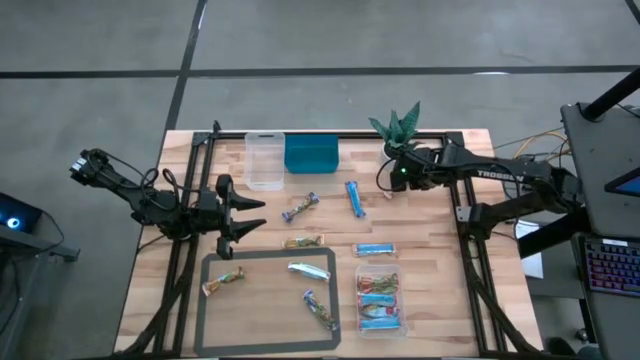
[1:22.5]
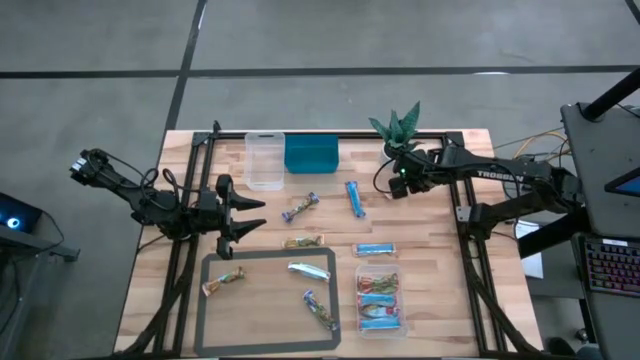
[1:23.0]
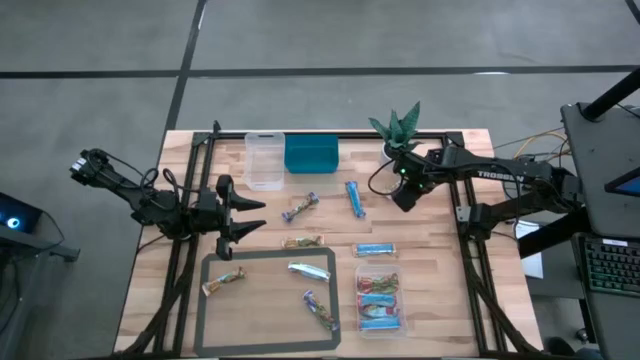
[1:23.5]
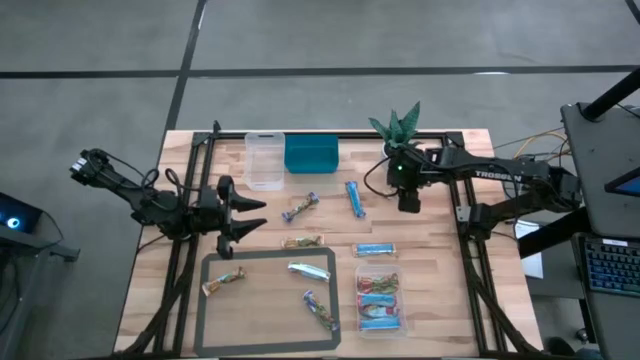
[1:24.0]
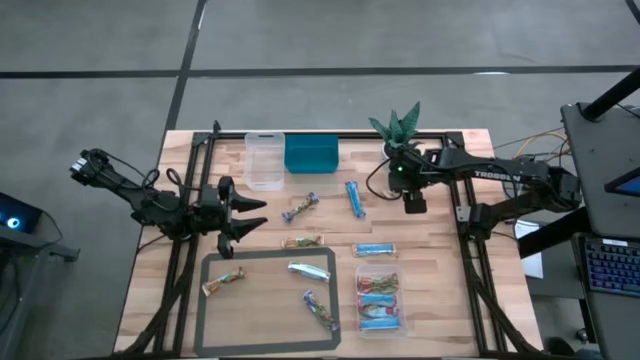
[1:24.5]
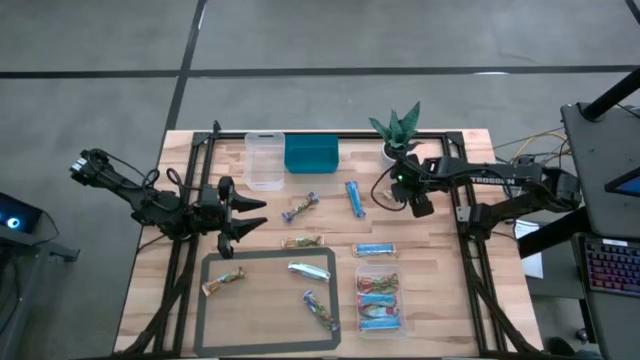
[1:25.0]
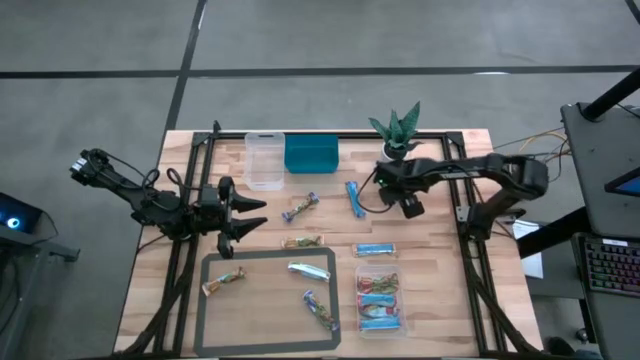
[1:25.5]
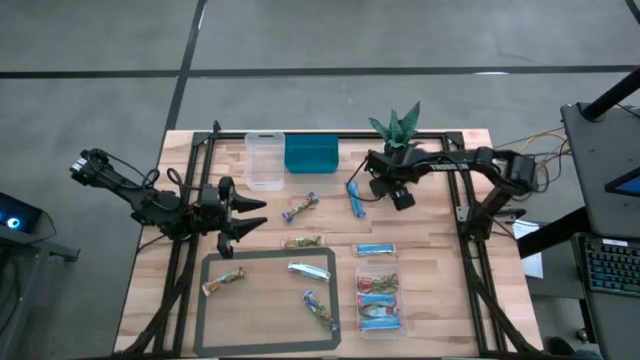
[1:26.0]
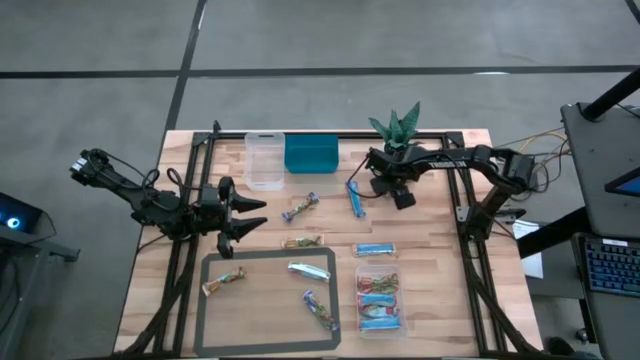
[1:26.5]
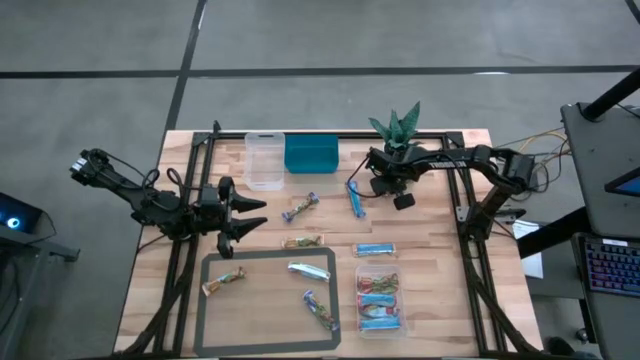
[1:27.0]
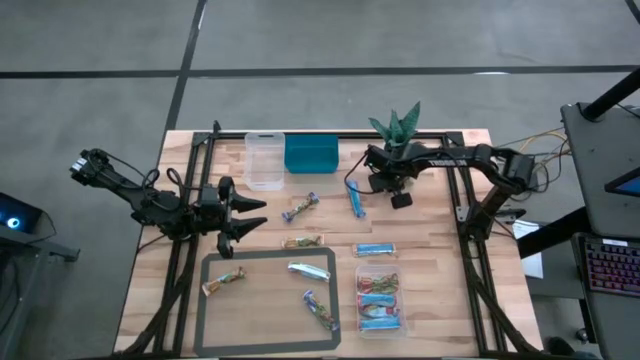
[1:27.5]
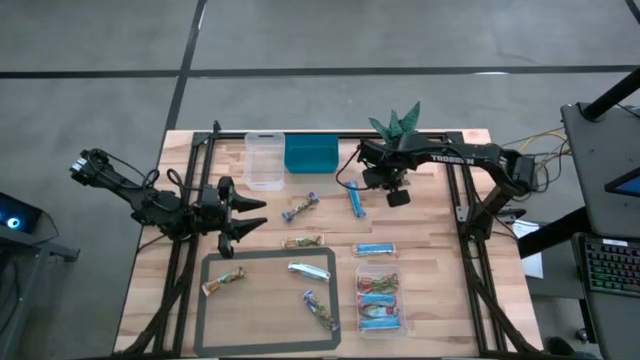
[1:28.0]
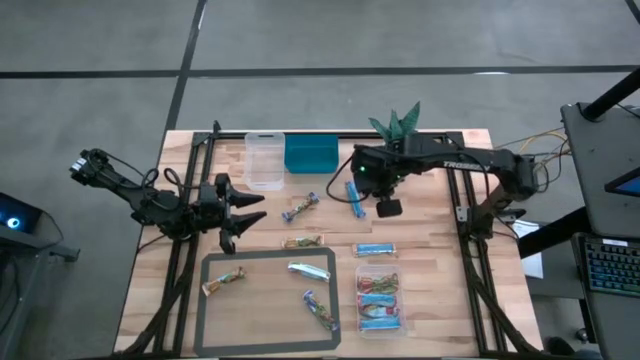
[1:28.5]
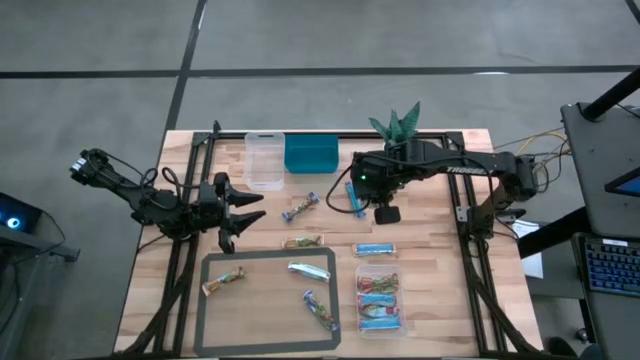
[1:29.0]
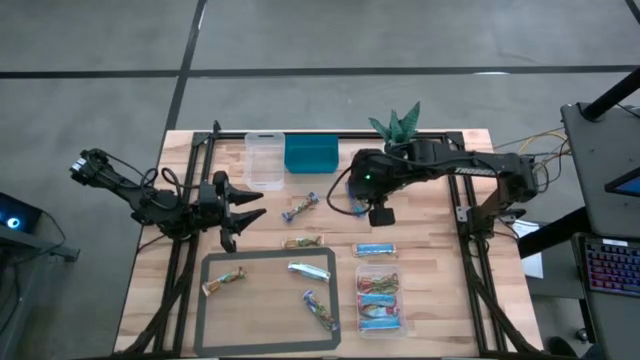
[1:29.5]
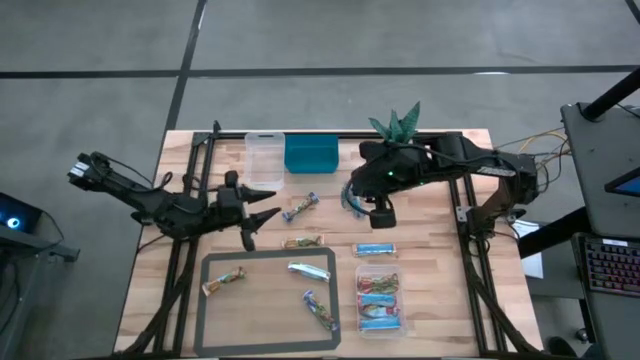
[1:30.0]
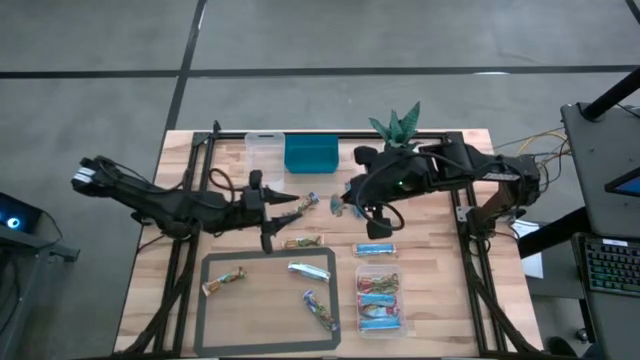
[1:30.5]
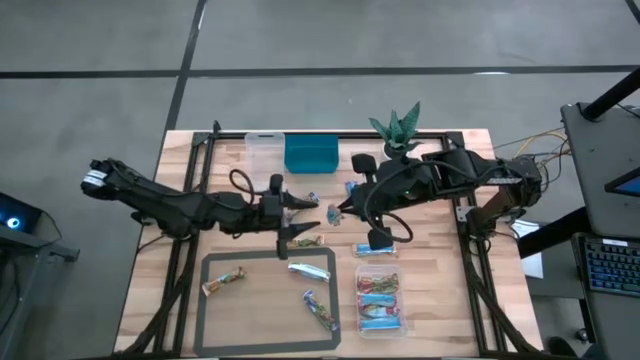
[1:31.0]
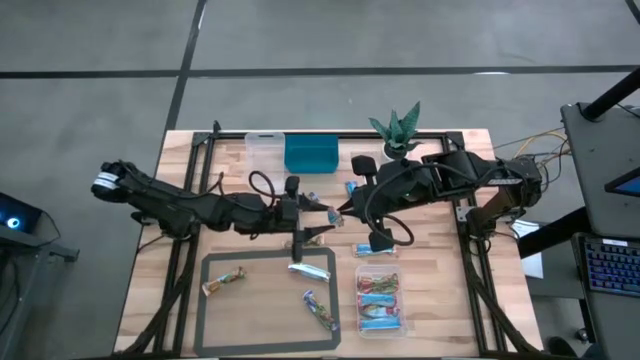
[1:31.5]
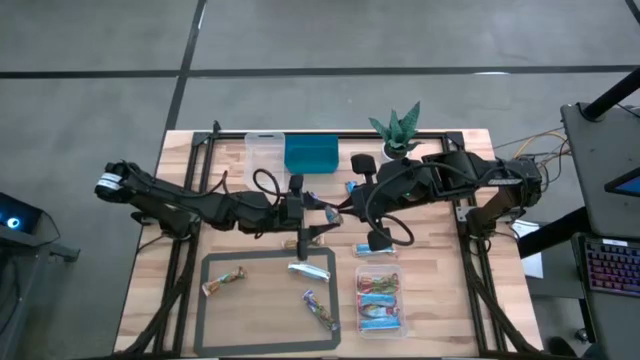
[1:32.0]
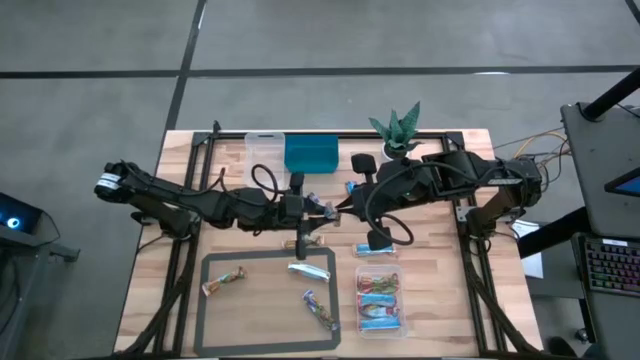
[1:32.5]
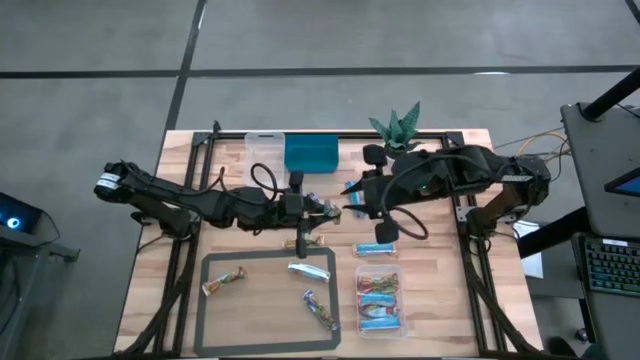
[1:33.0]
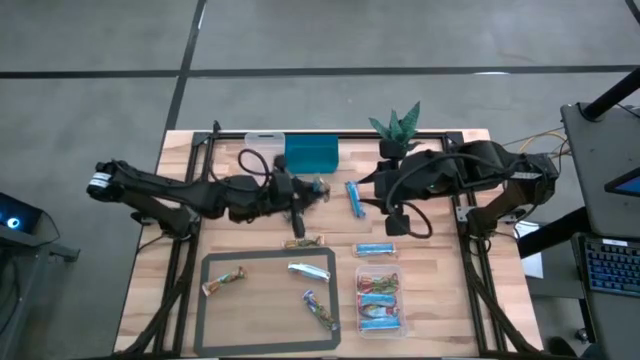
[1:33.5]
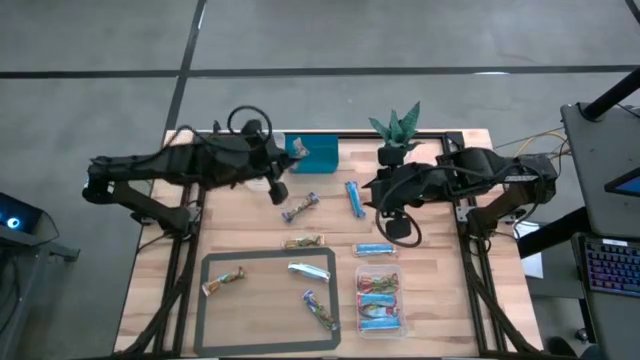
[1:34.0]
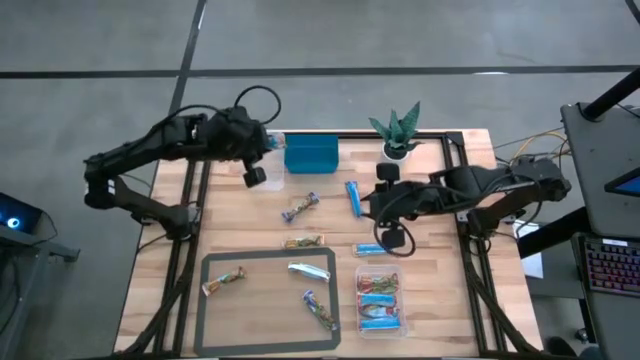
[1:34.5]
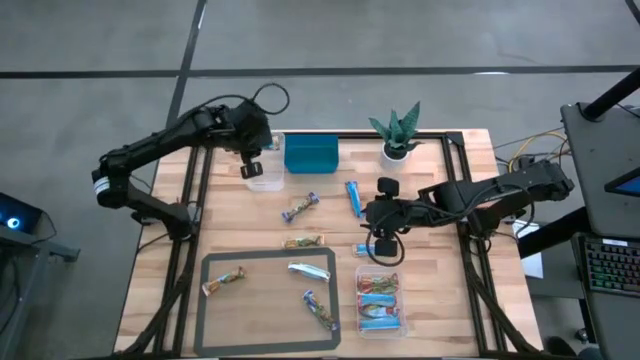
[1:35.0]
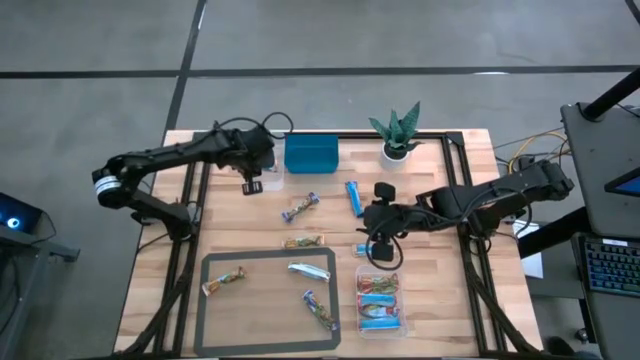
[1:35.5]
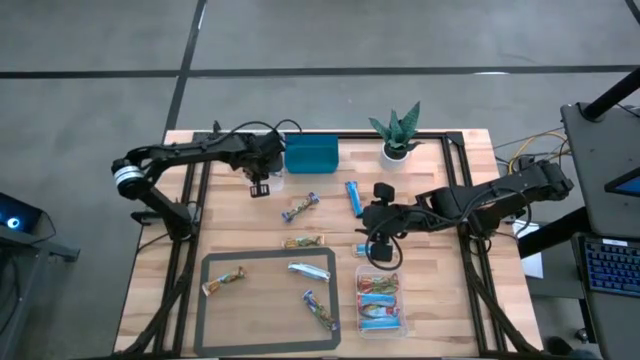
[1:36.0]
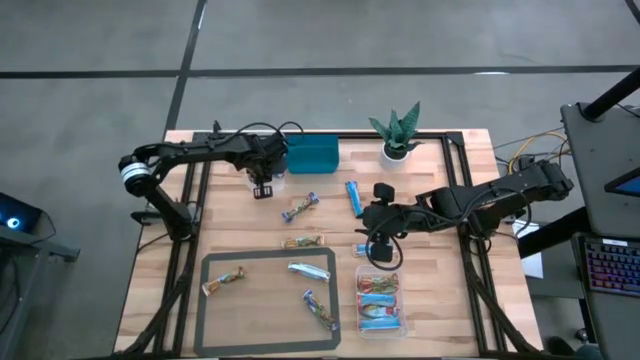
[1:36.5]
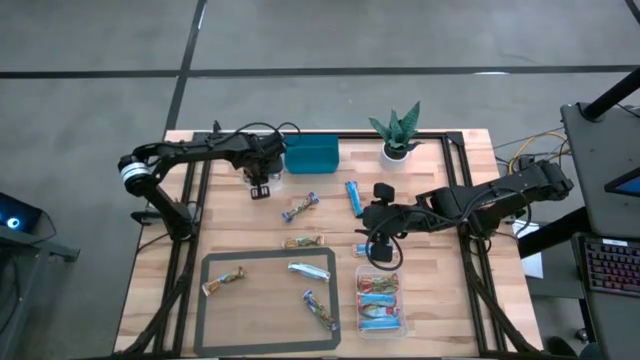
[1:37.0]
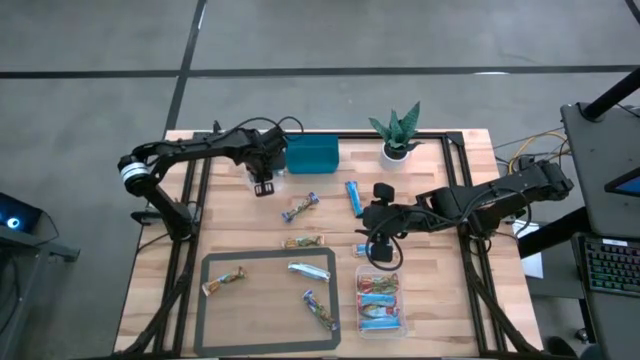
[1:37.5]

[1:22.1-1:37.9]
Task: Pick and place Granola Bars by type
Put the yellow granola bar into the top transparent bin

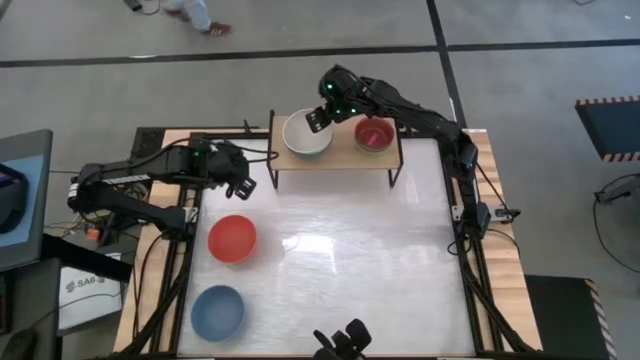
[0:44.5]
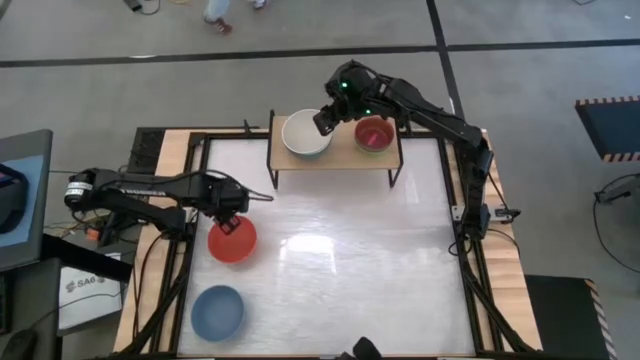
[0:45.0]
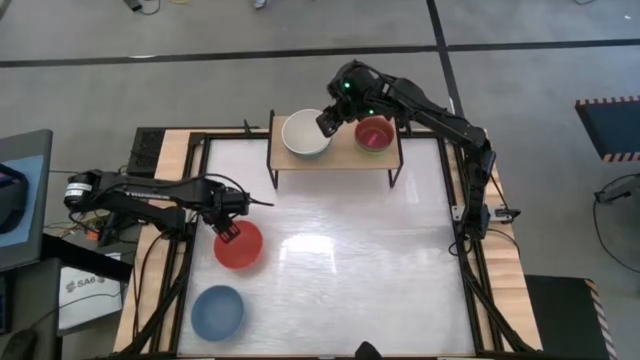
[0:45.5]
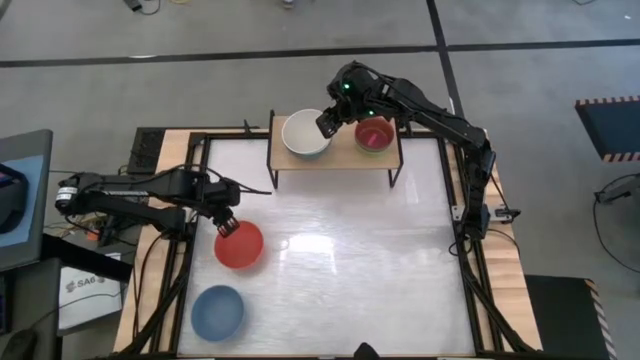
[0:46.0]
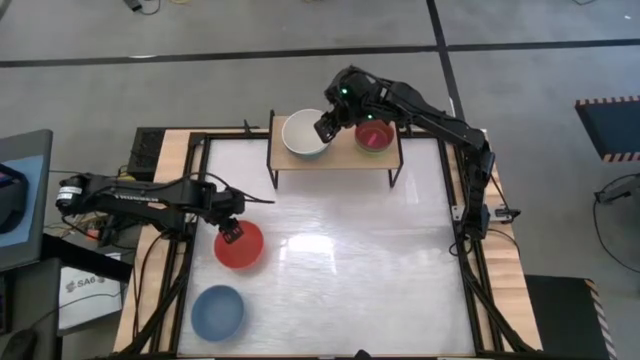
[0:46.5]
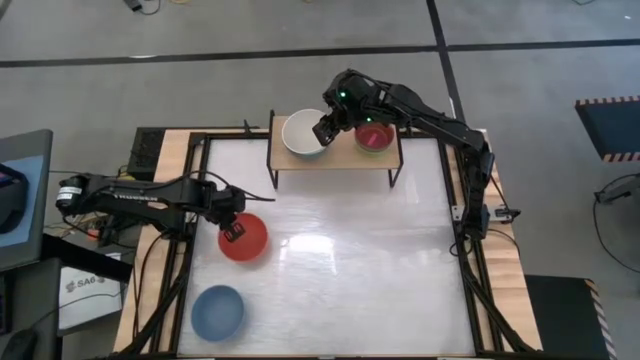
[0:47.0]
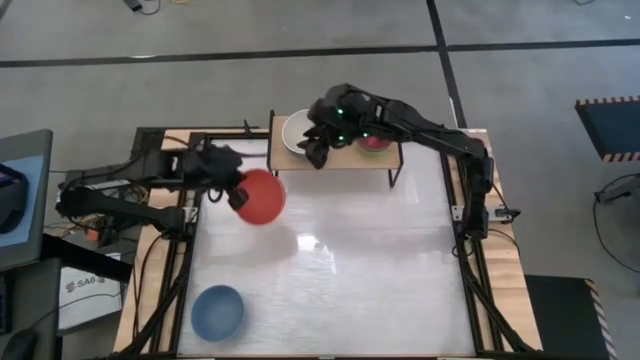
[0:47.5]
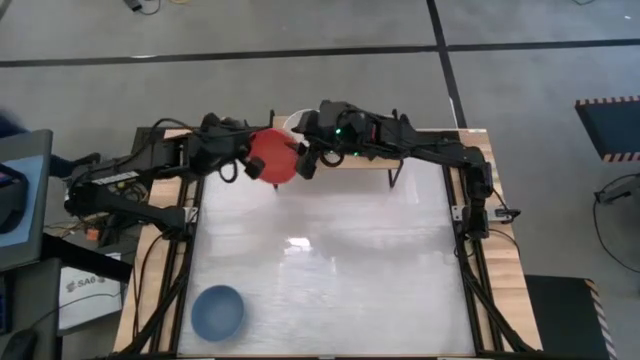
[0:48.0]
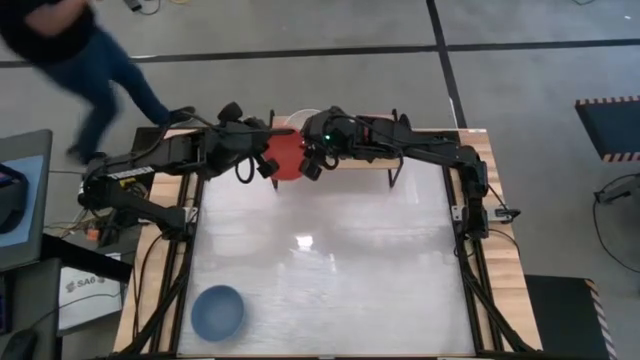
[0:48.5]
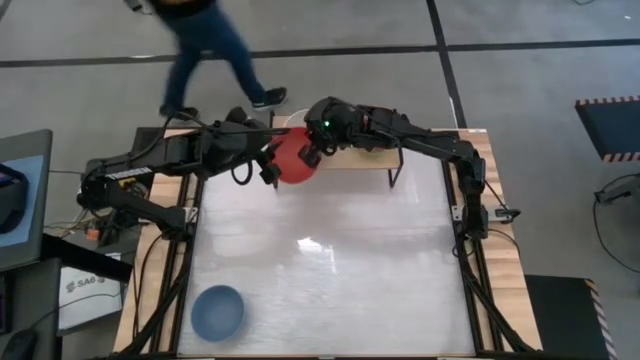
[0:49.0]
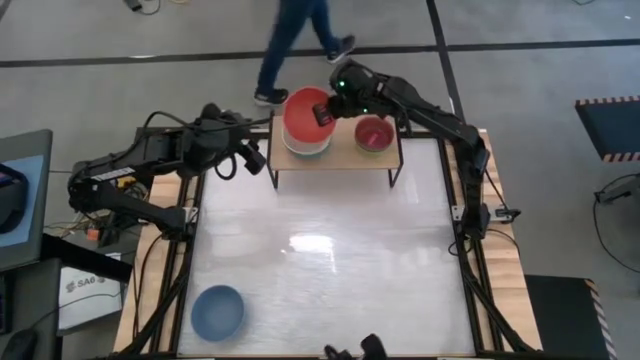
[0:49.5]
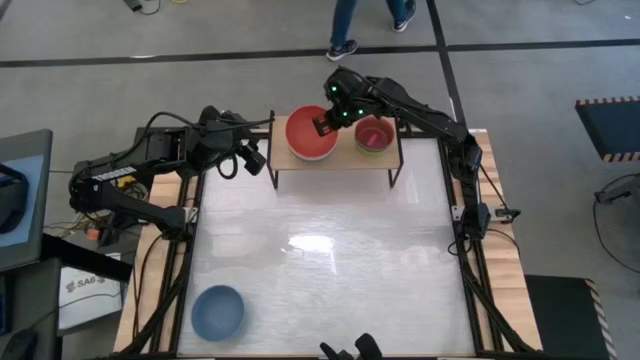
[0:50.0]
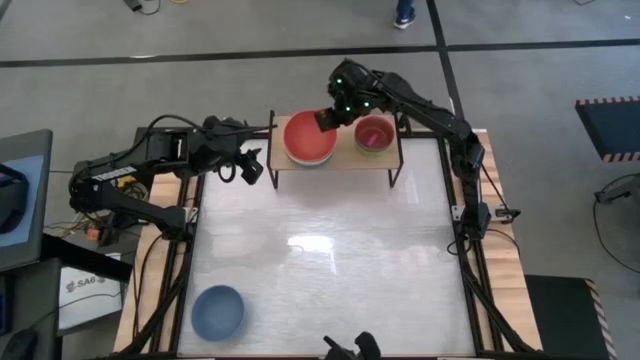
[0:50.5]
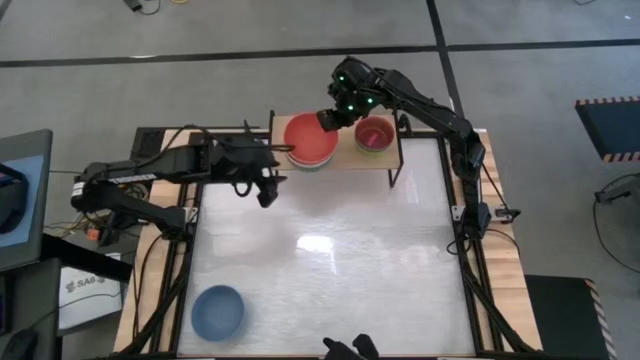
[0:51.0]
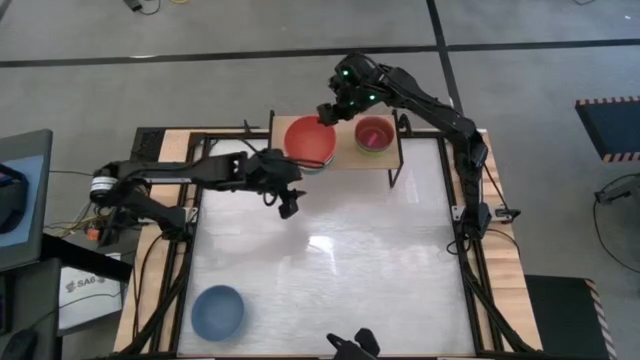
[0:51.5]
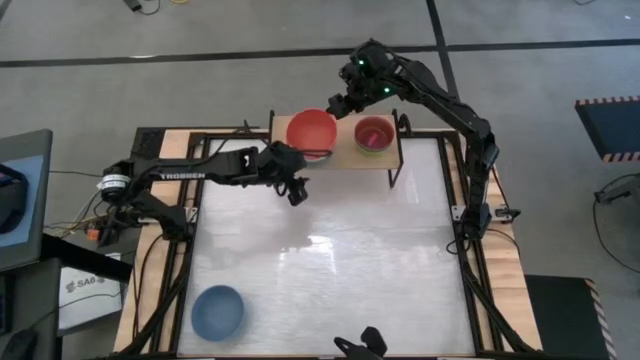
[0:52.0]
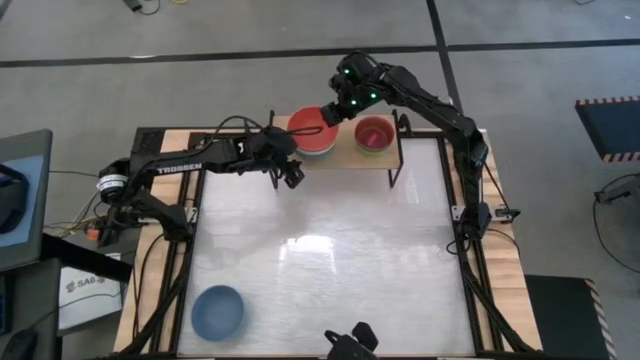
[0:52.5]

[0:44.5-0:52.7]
Task: Place and stack bowls onto a shelf
Stack the orange bowl on top of the white bowl on the shelf
